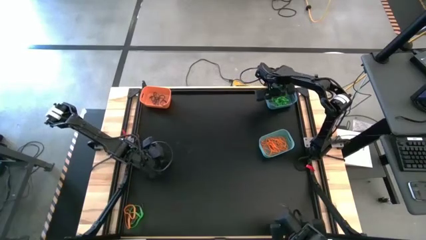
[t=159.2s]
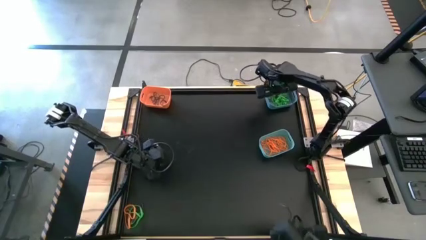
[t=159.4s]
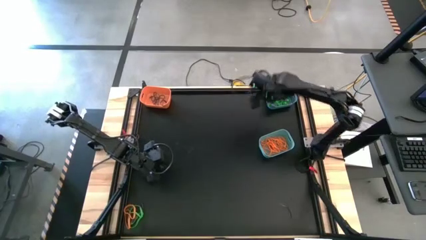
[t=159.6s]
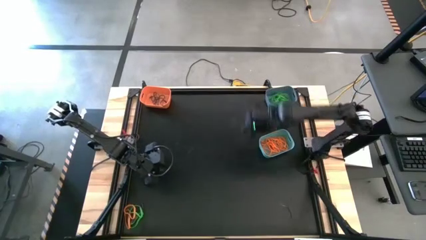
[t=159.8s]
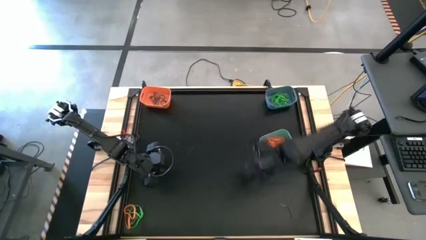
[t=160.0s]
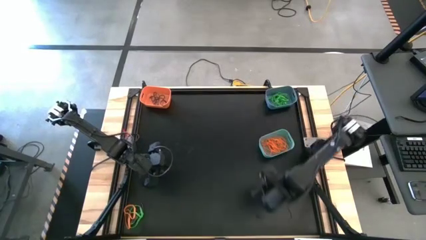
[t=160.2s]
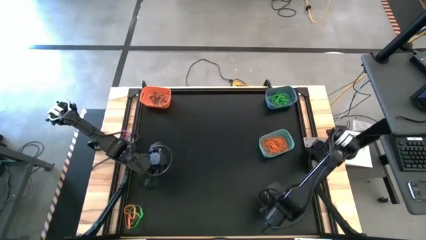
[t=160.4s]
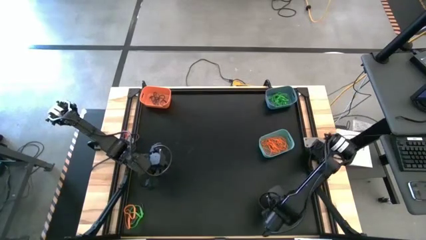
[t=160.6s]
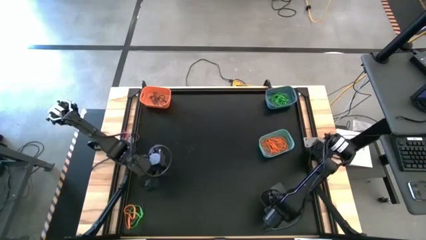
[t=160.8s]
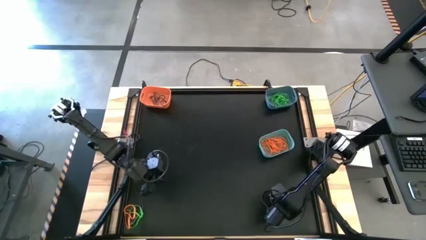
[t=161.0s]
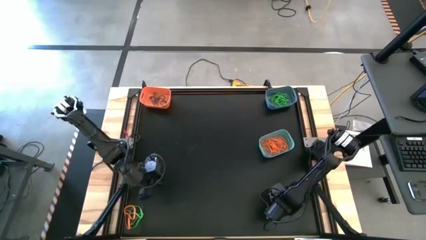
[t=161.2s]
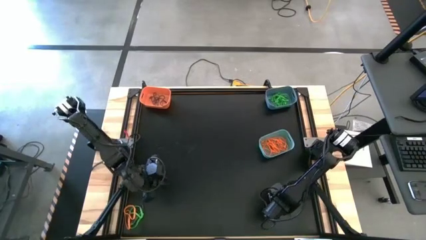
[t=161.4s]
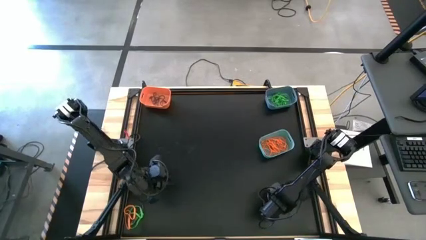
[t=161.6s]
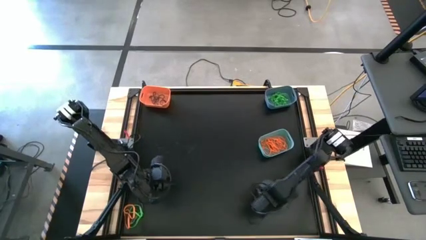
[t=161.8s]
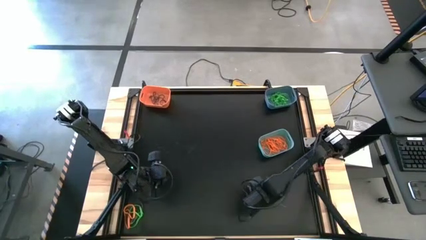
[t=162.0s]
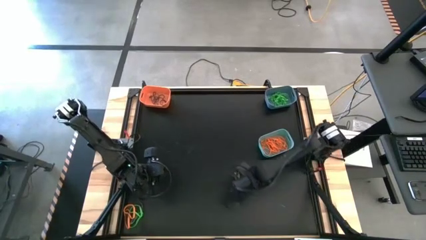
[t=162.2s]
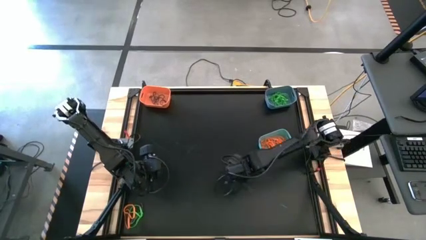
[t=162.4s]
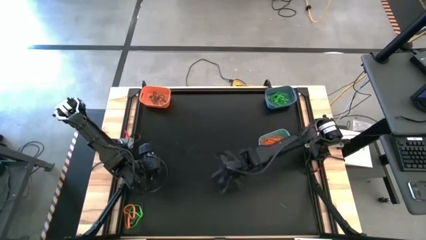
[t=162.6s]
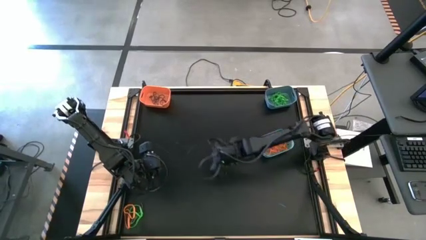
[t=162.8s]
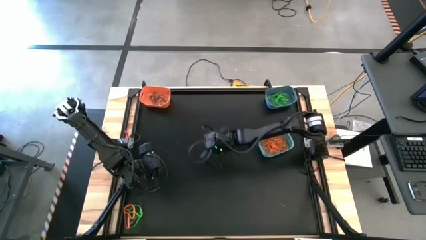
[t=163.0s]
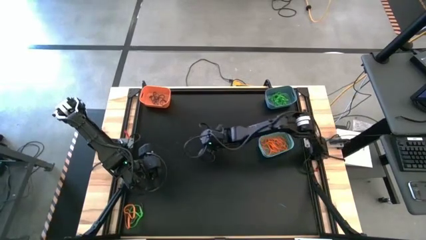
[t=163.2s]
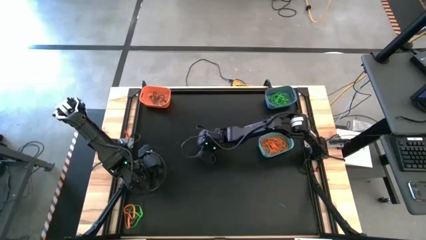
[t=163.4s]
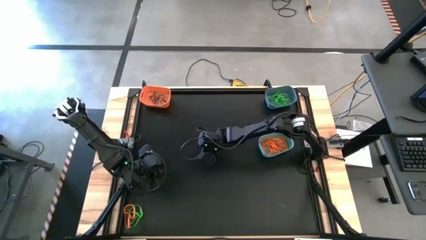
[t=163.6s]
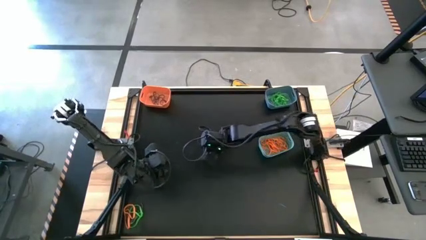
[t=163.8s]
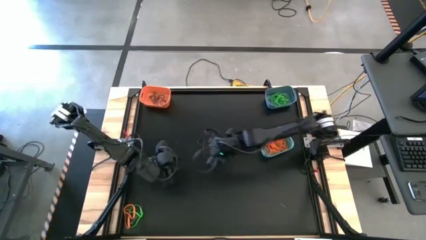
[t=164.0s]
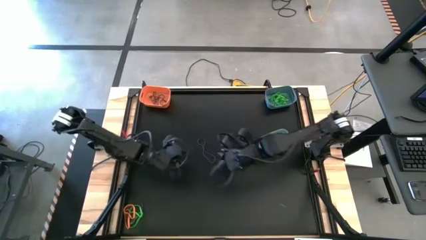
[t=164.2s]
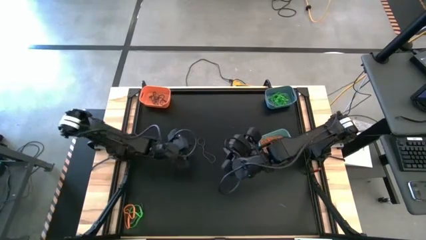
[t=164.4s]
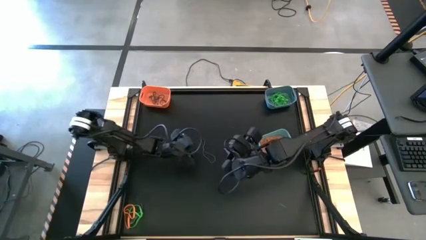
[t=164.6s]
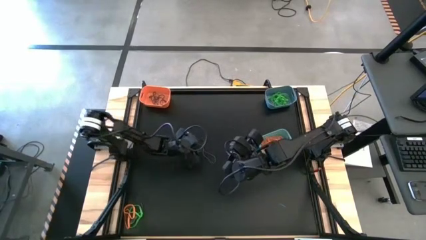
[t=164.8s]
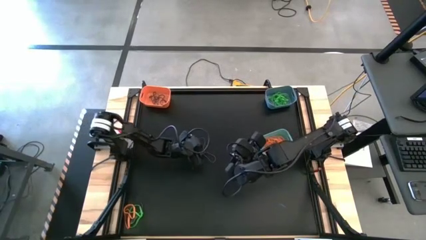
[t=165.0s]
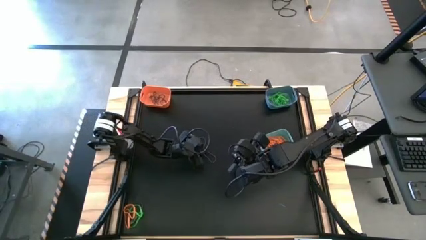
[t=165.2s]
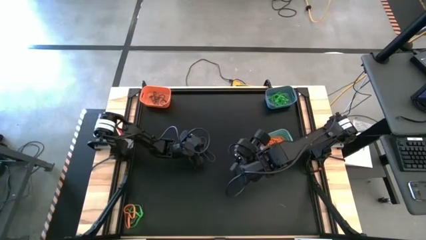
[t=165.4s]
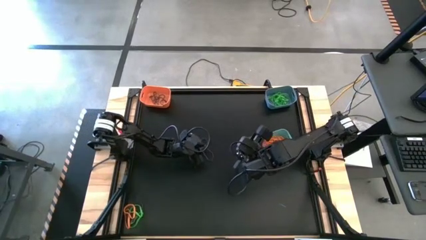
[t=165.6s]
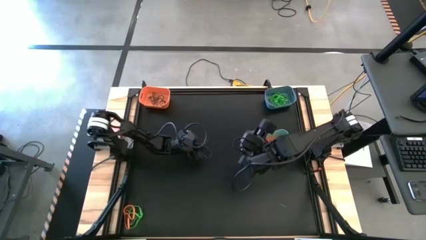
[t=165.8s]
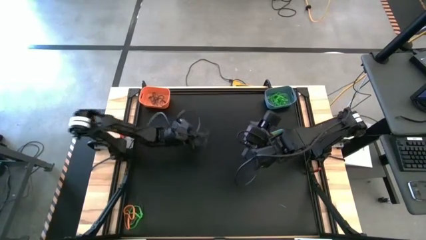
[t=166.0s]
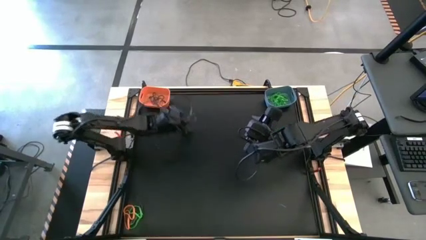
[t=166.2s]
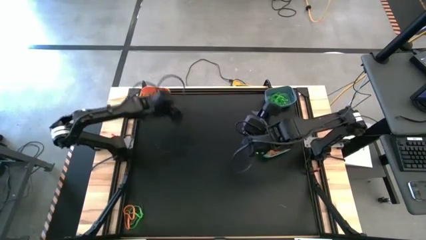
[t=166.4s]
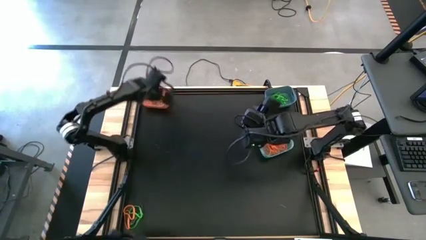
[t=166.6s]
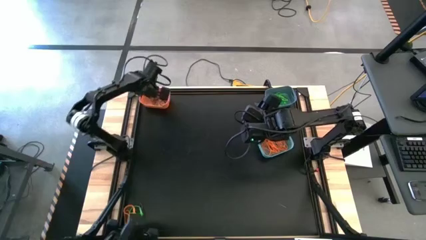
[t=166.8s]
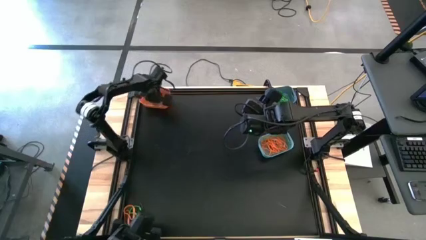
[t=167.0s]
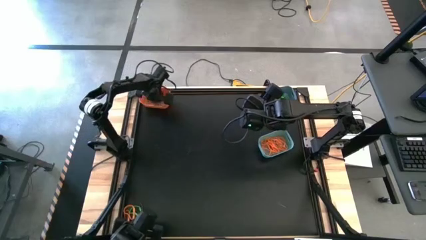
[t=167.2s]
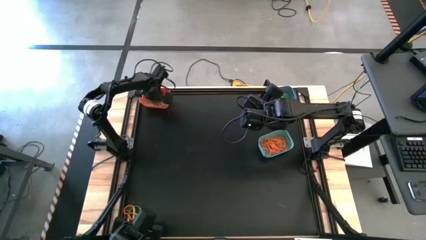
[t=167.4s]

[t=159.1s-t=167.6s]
Task: Sort rubber bands into baskets
Put the purple rubber band into the orange bin

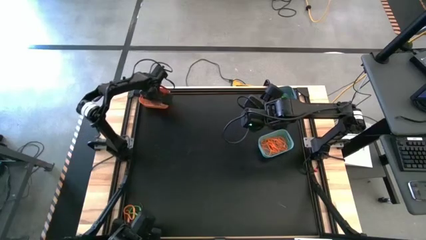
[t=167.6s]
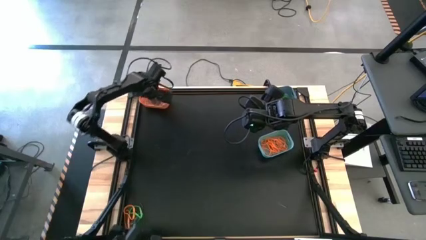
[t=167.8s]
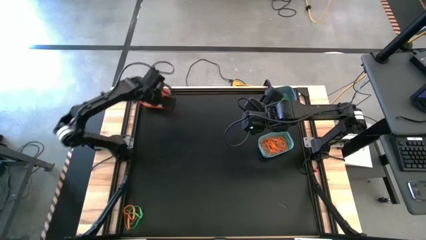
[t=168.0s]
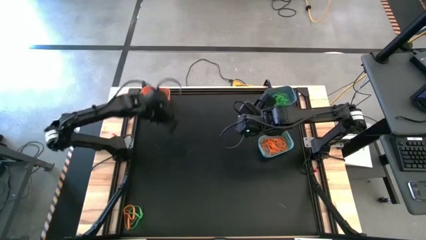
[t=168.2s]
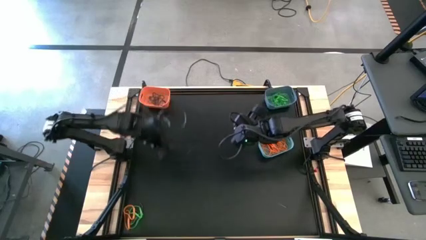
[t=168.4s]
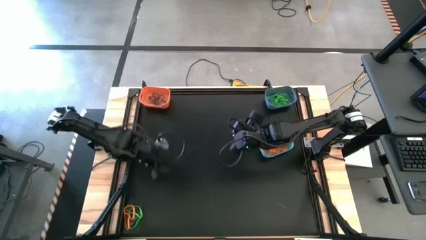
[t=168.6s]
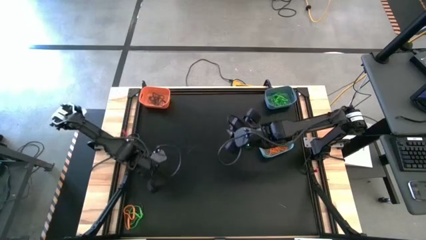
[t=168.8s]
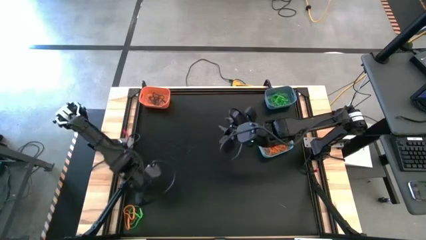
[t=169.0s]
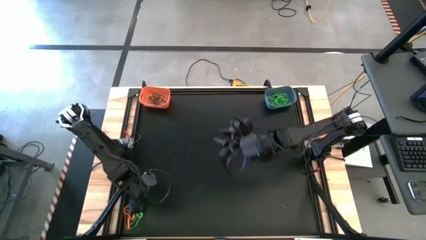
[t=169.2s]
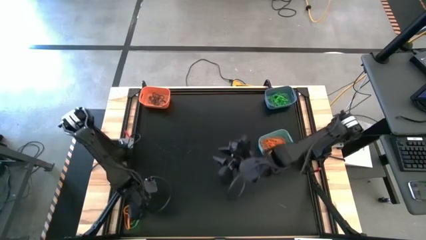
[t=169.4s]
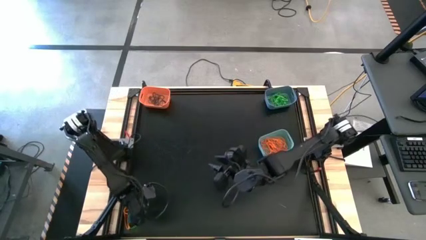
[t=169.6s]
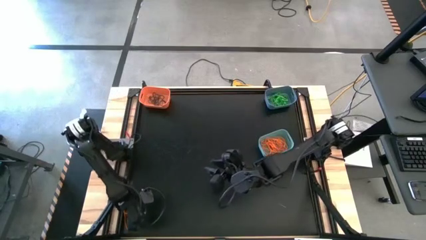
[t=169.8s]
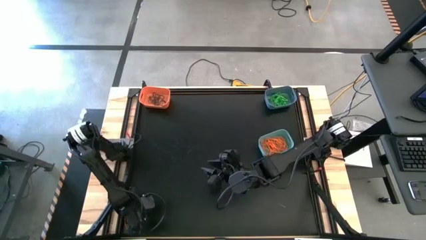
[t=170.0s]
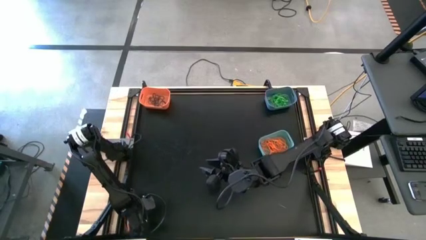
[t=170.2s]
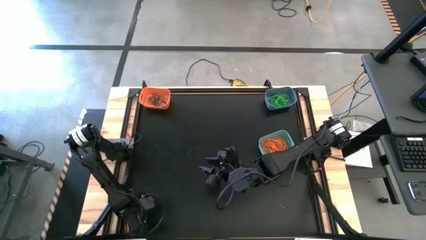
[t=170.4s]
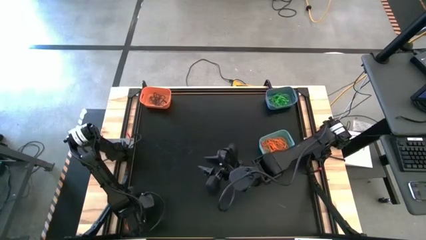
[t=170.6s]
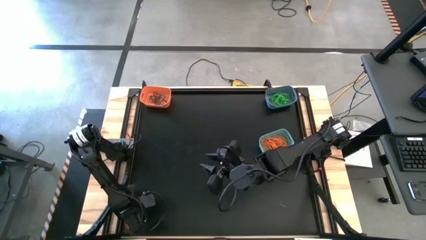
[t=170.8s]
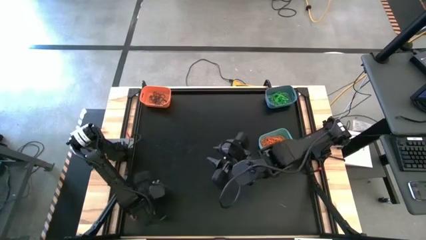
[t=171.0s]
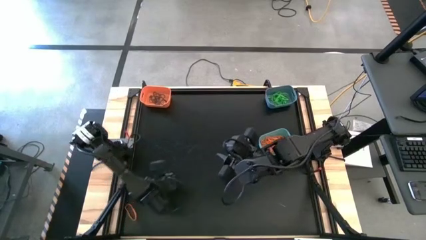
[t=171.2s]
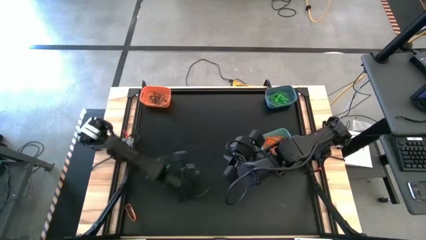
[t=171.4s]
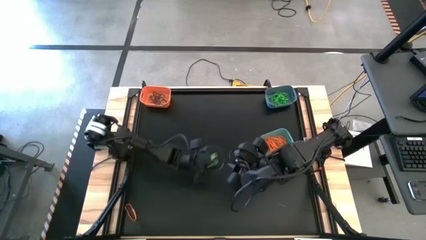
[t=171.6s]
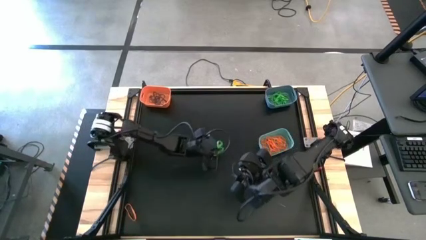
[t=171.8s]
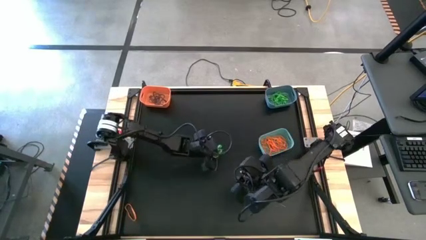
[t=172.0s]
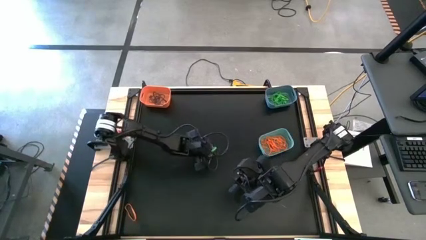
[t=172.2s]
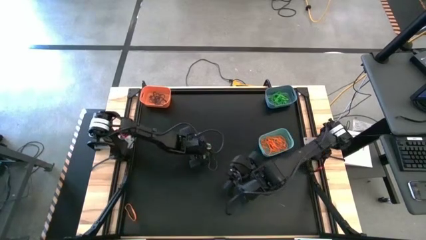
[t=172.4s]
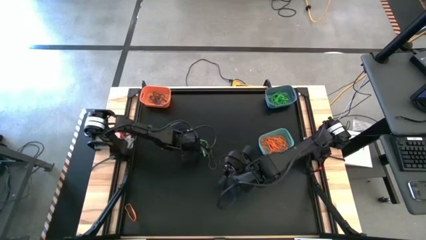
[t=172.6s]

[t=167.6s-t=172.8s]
Move the rubber bands to the center of the table

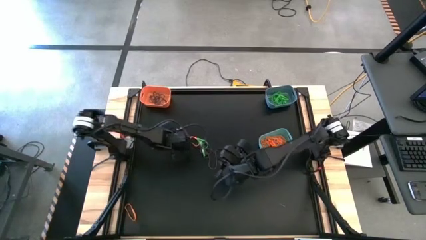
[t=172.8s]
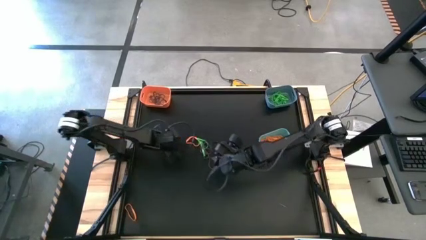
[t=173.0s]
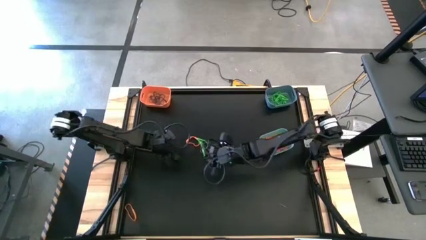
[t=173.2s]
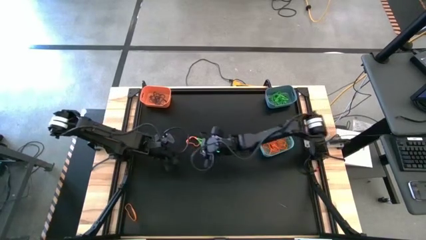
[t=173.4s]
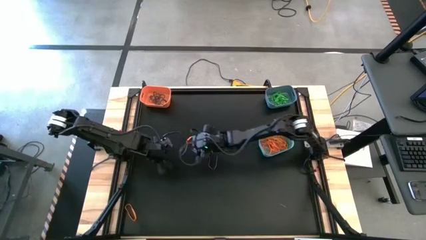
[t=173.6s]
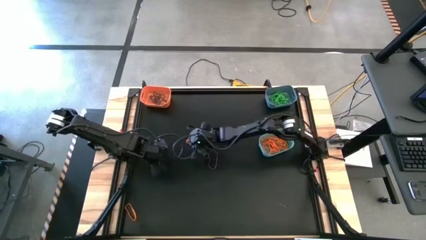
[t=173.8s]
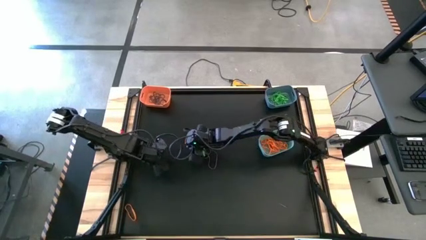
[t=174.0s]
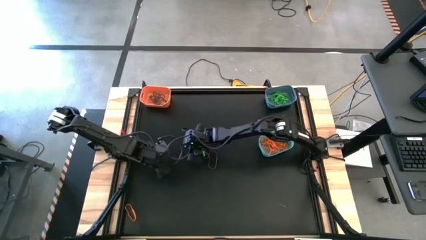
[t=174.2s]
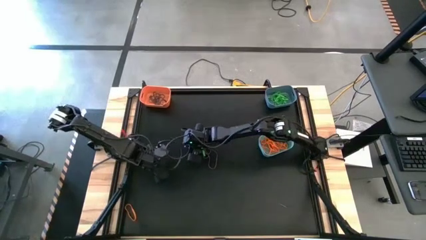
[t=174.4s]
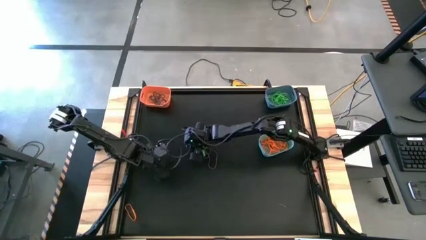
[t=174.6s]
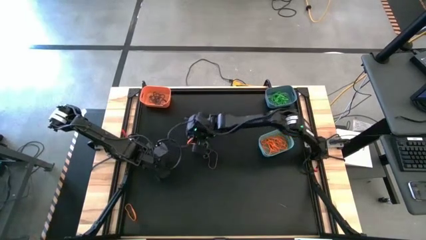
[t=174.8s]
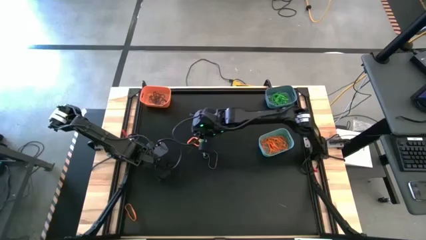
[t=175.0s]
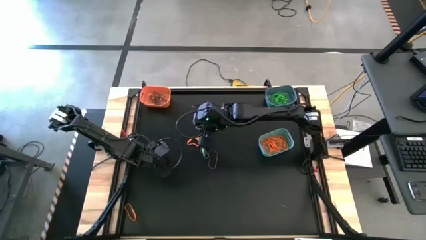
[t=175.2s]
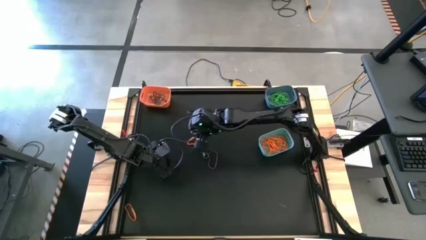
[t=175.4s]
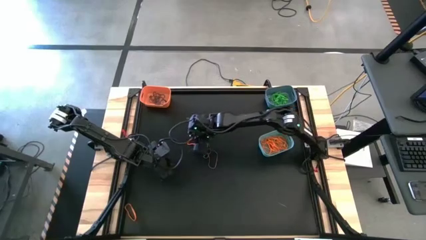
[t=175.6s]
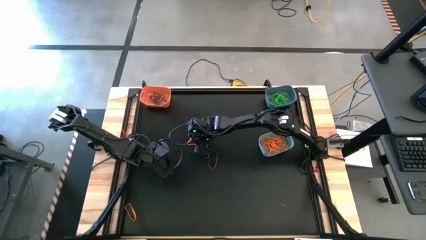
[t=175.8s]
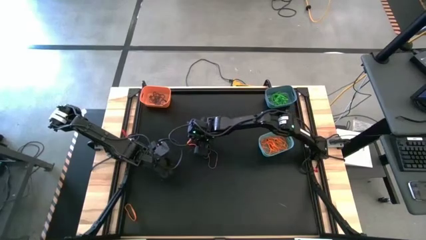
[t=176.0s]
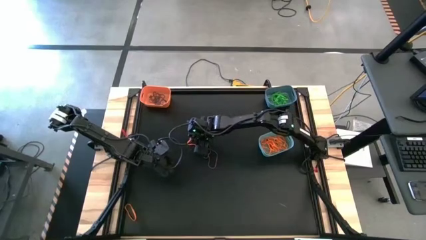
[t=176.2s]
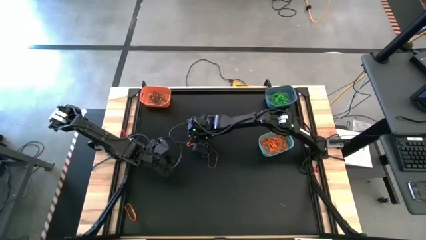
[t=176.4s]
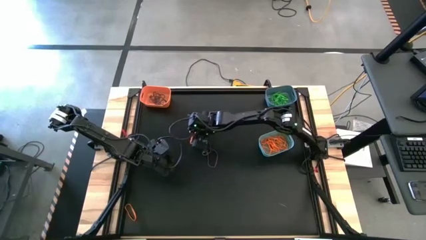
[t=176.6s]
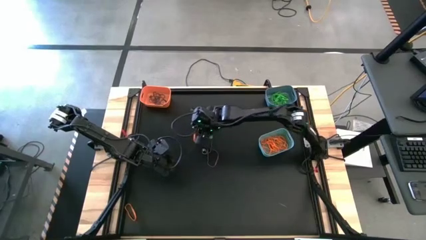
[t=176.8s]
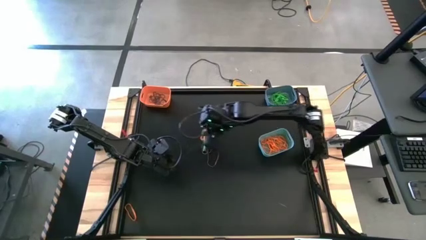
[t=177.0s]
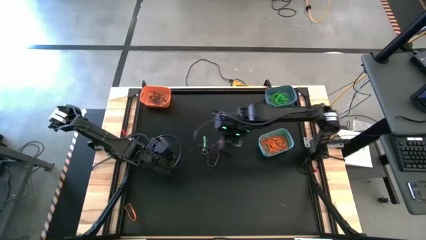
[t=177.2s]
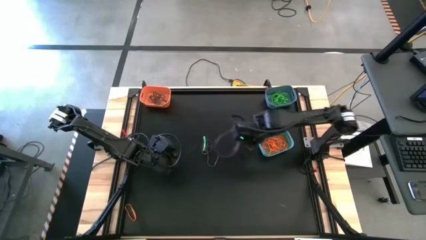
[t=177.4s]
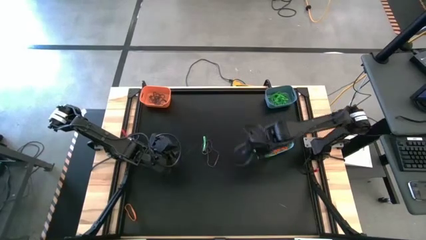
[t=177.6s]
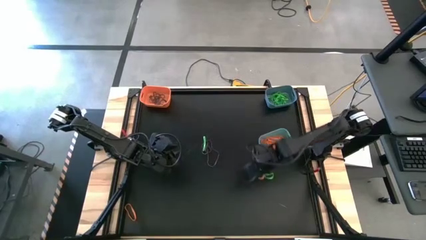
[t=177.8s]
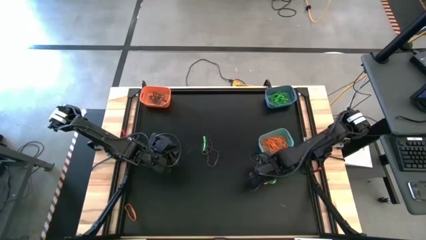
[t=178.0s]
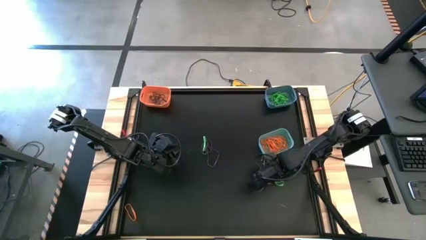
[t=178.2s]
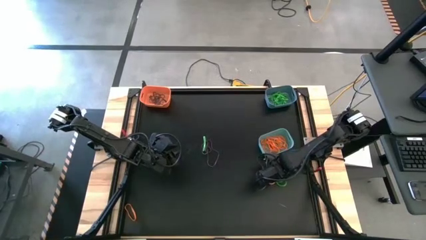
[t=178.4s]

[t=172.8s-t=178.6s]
Put the orange rubber band into the green bin
